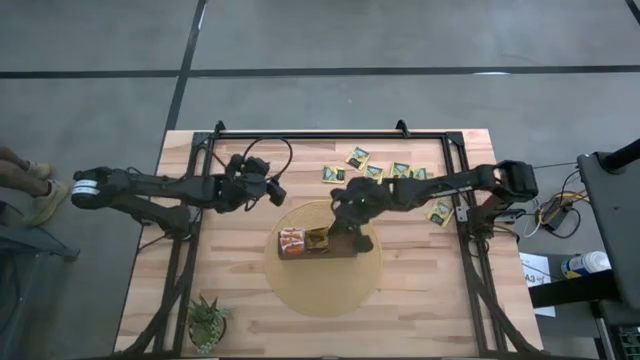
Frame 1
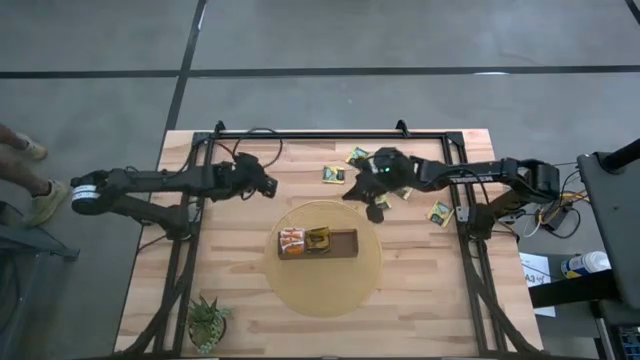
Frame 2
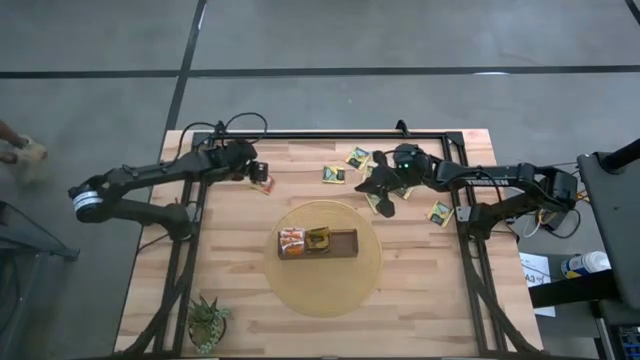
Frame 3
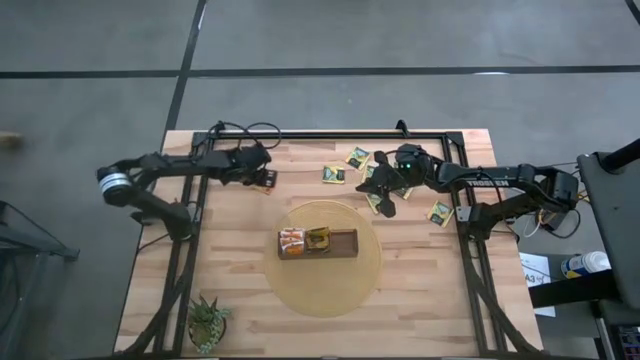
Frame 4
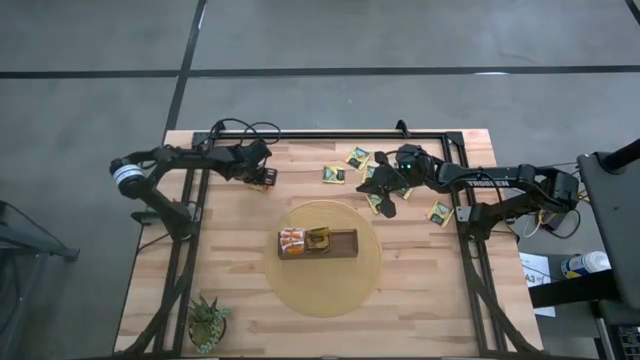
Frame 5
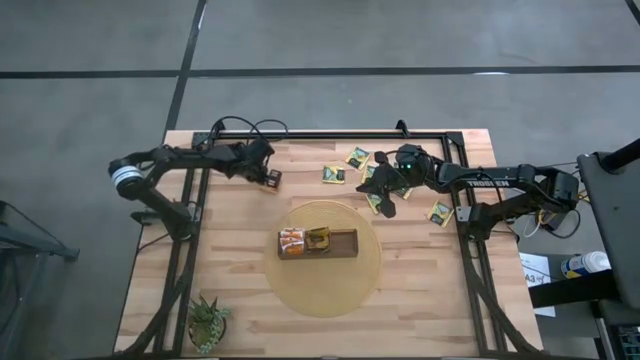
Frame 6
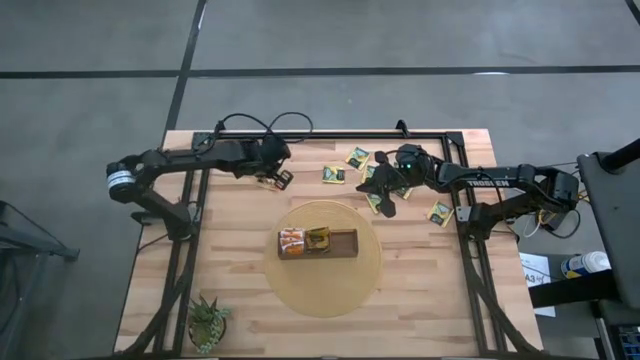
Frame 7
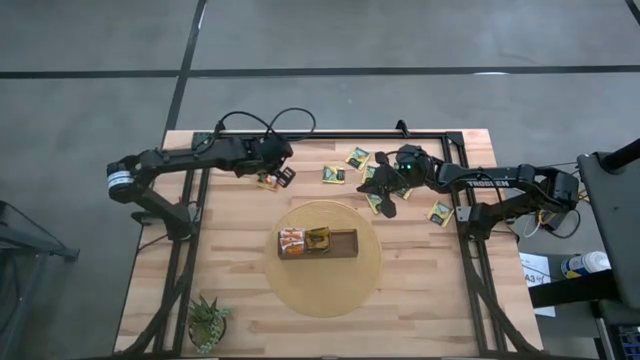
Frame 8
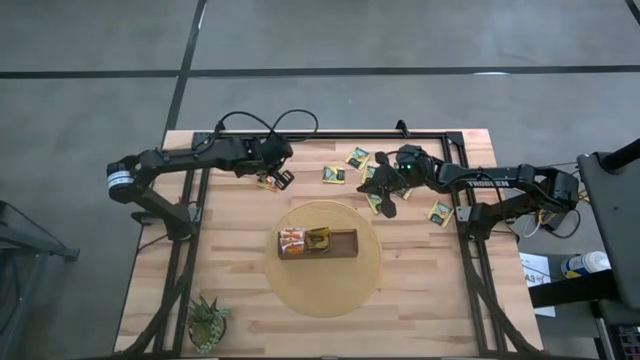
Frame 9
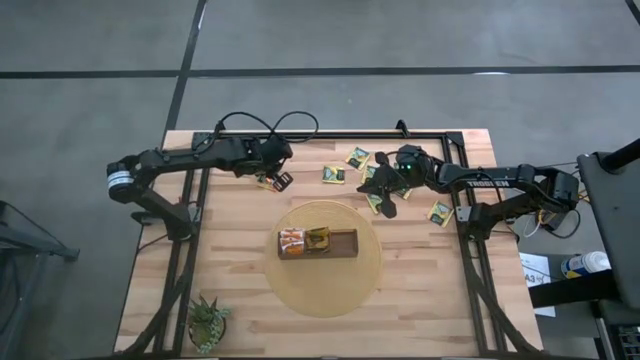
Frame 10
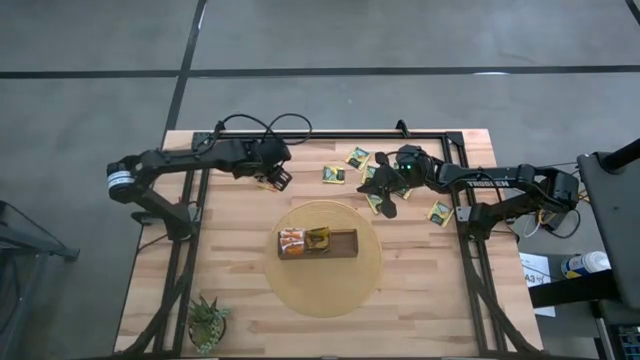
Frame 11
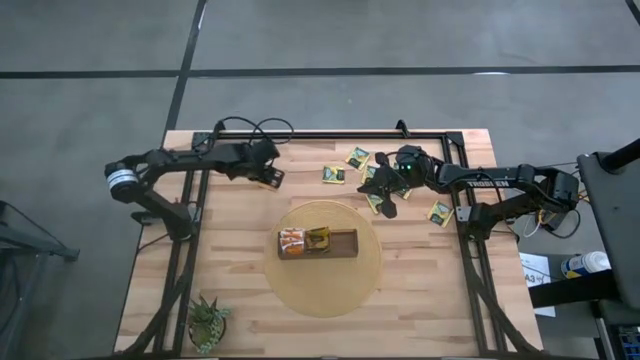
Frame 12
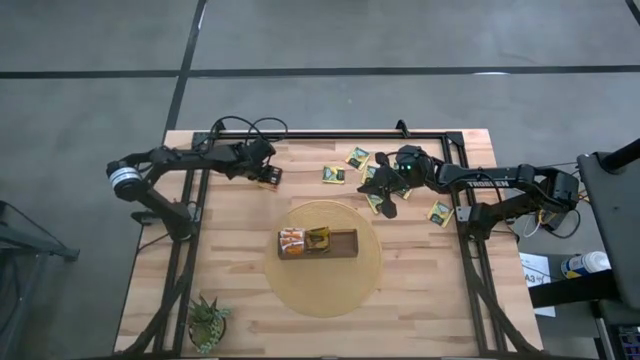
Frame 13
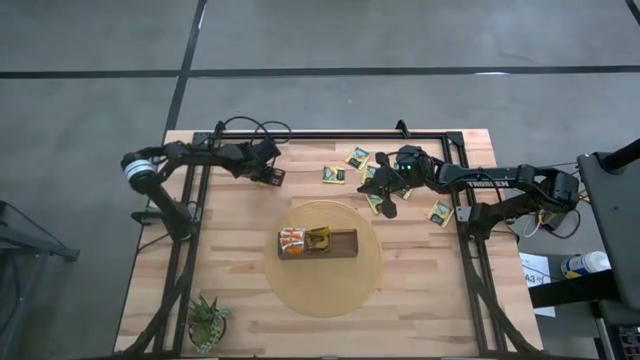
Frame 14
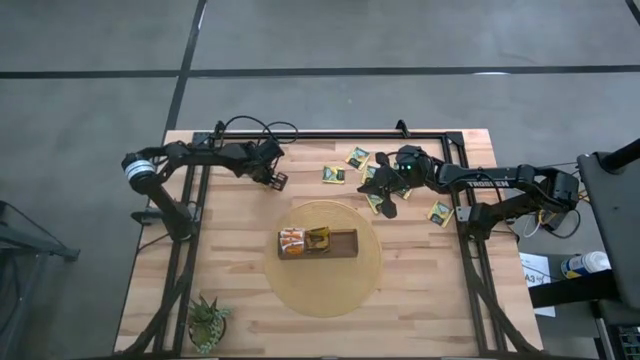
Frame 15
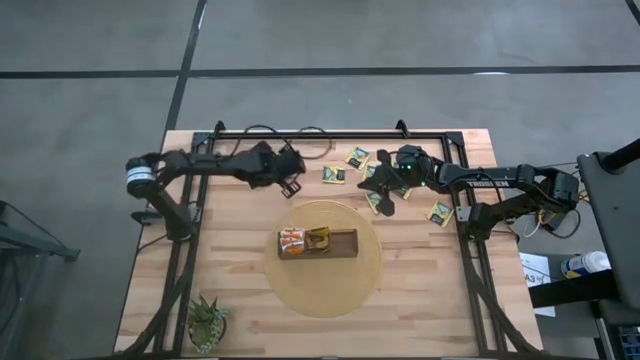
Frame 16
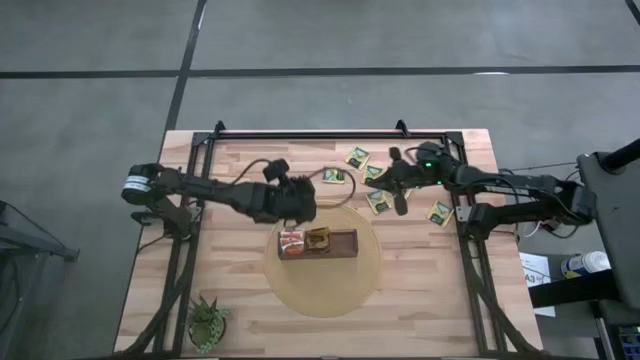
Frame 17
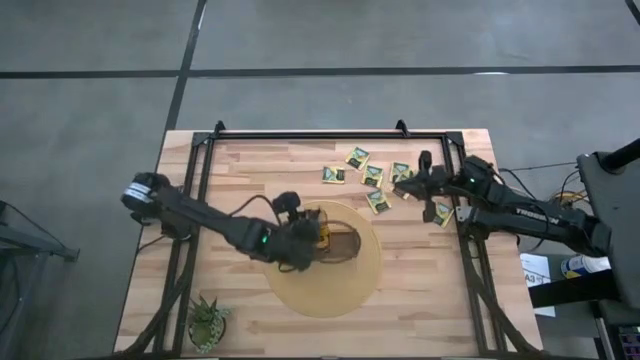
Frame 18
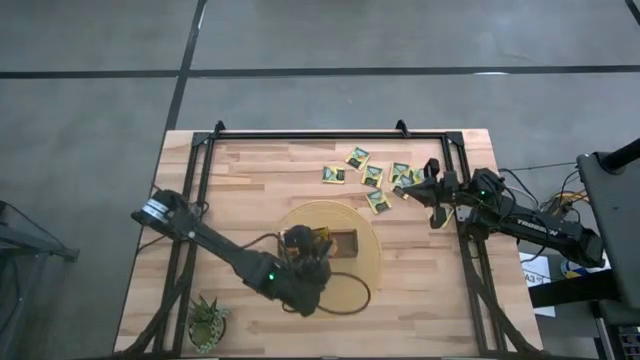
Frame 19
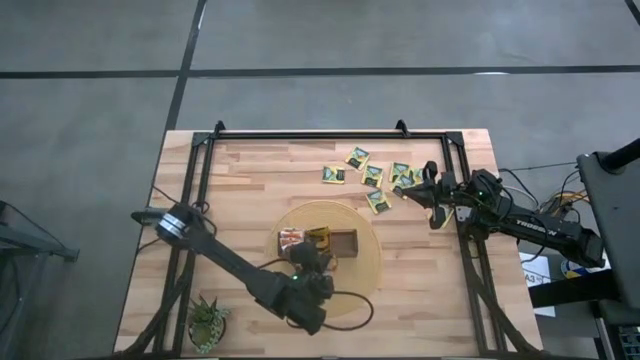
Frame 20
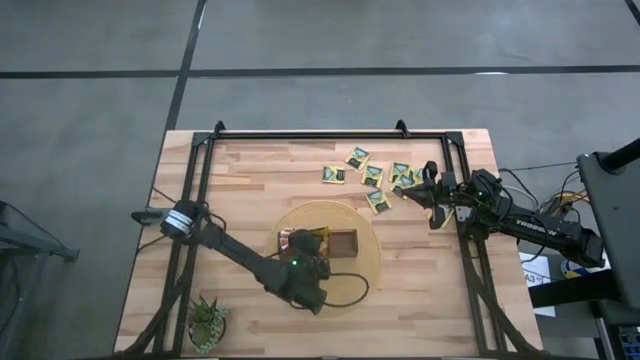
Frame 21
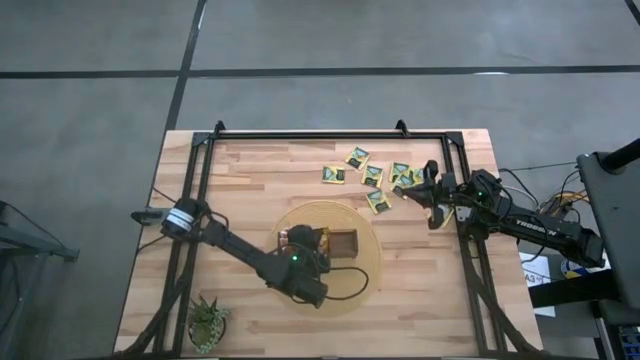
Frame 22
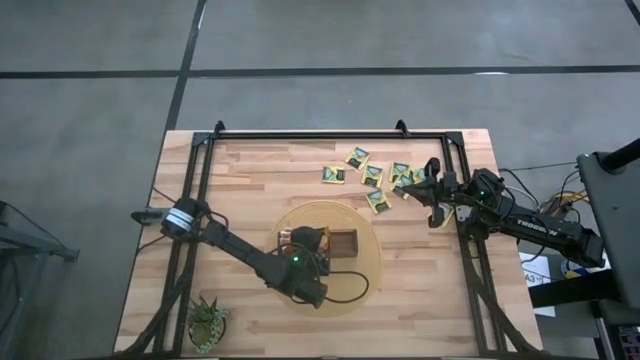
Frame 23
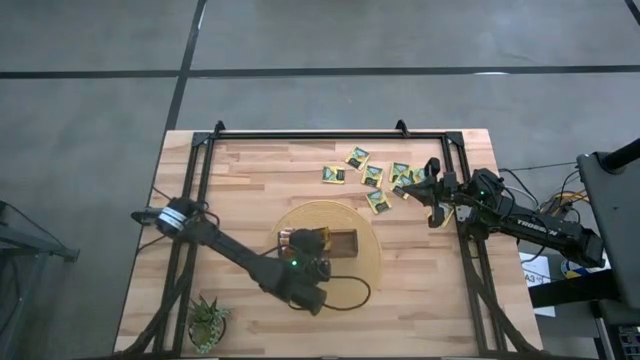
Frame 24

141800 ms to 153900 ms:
Task: Pick & Place Tea
Put the orange tea bag into the middle section of the wooden organizer

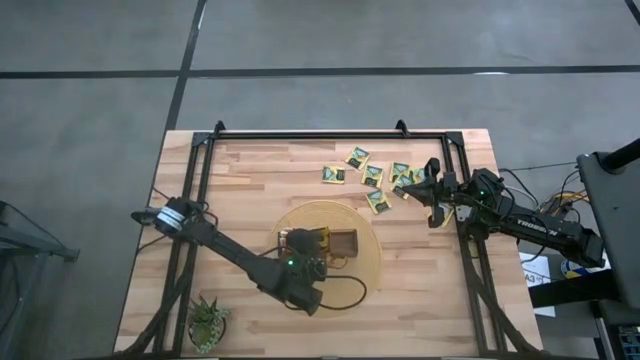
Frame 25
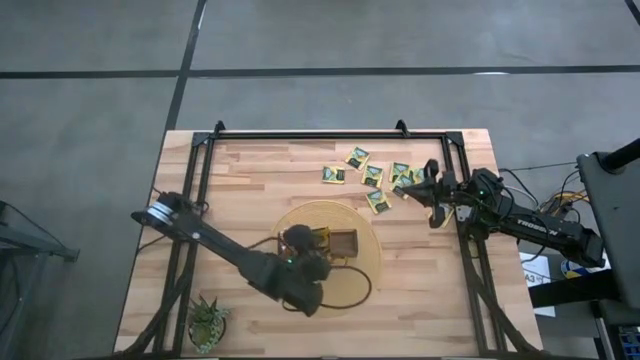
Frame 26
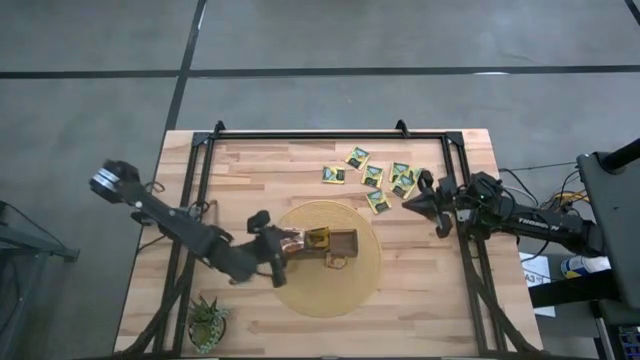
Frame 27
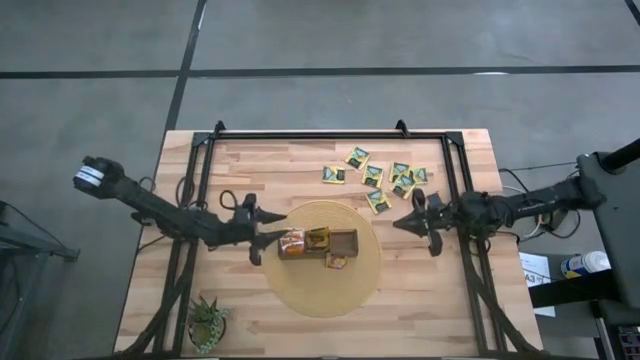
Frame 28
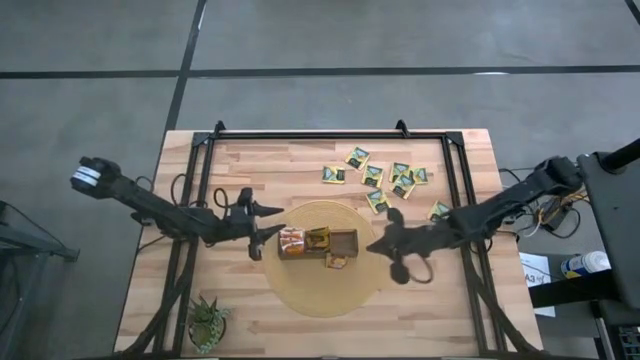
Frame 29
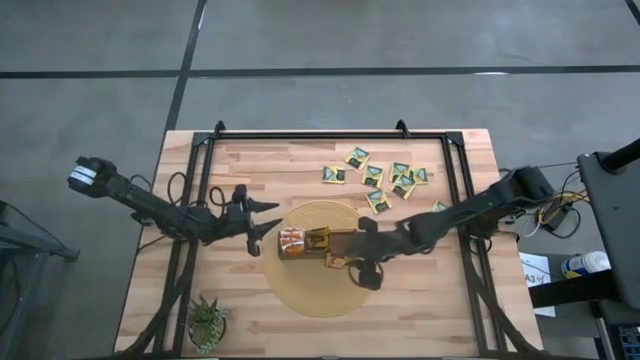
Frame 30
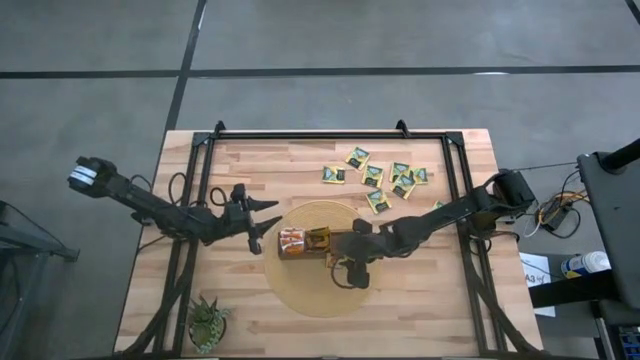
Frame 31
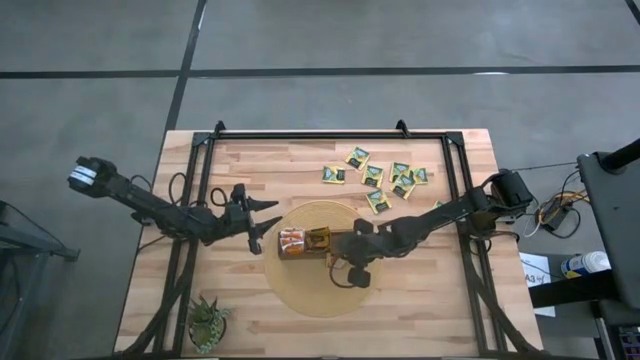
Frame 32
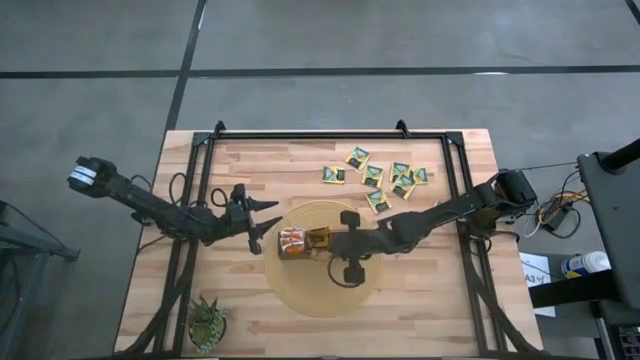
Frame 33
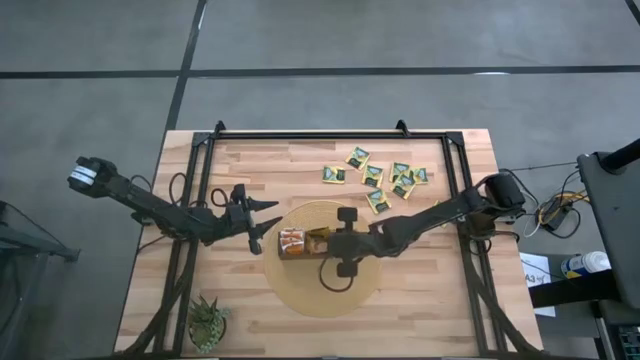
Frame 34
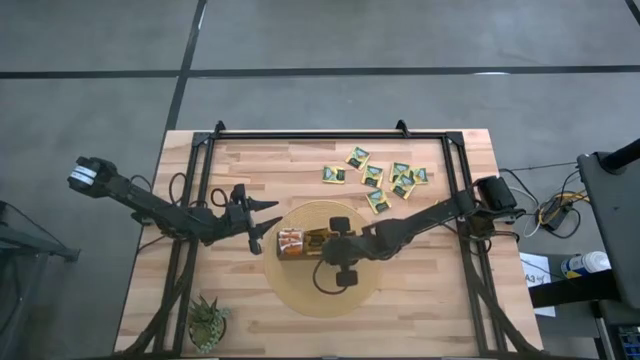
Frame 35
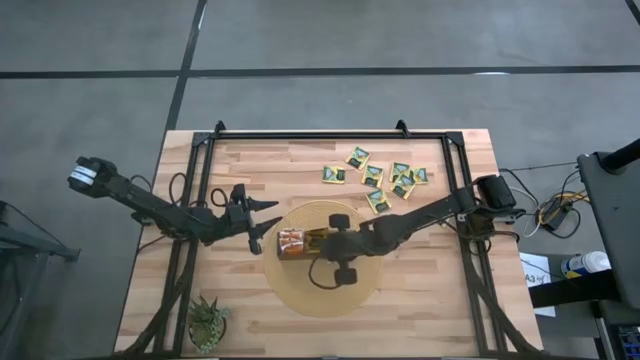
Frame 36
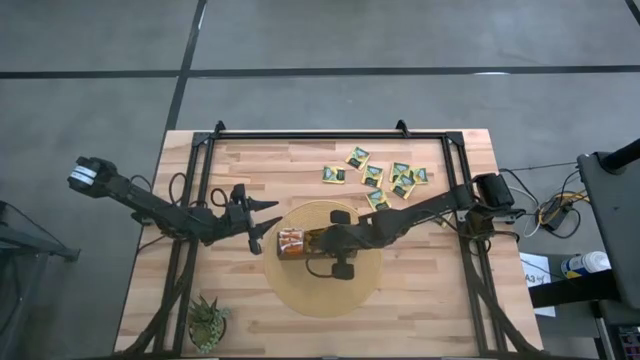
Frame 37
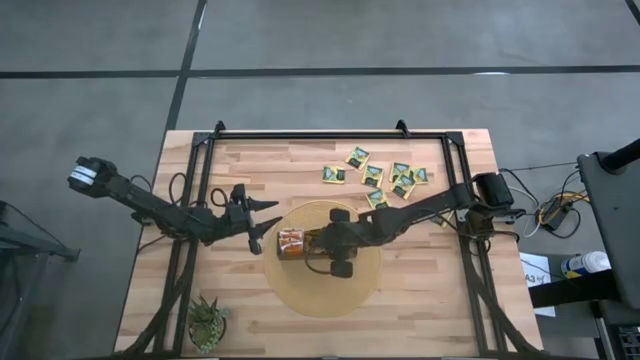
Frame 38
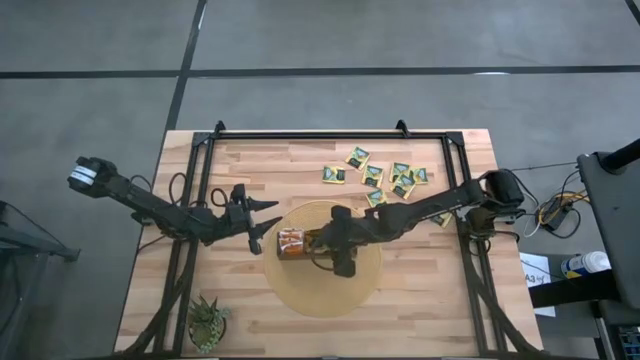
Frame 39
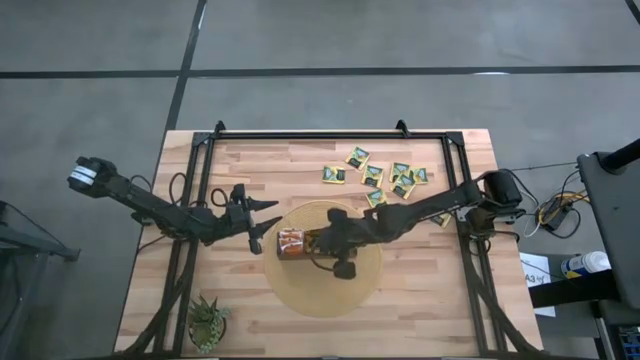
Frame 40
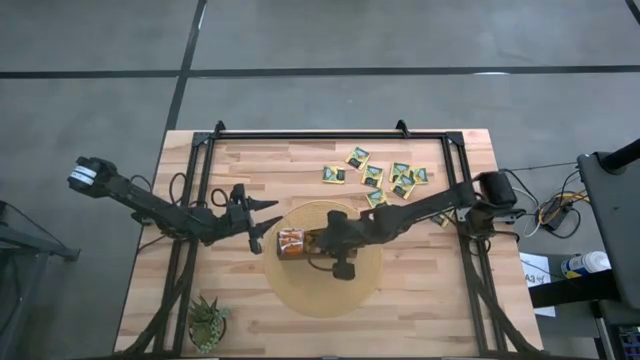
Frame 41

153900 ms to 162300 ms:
Put the orange tea bag into the middle section of the wooden organizer

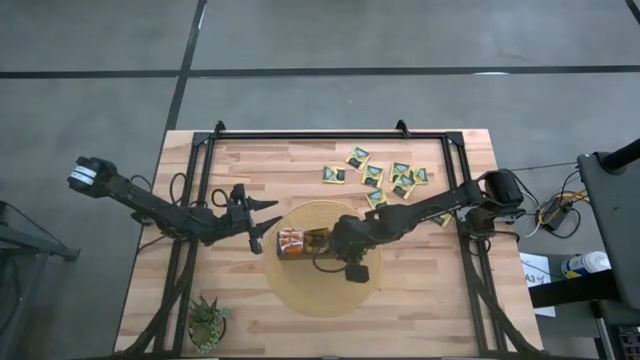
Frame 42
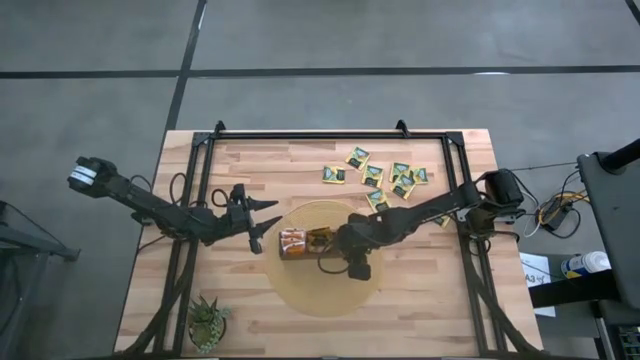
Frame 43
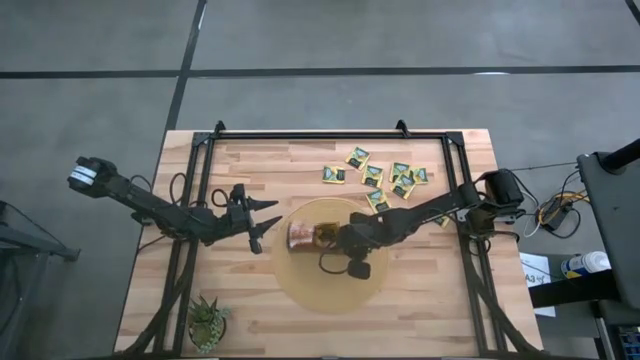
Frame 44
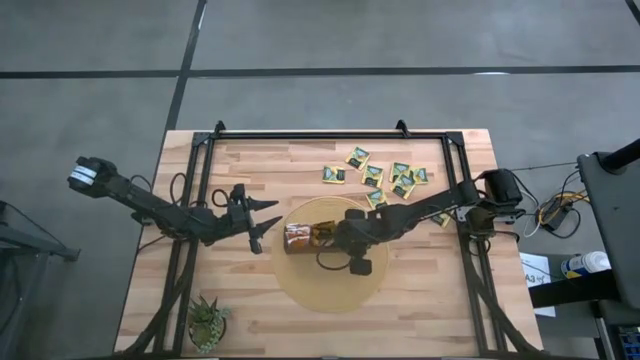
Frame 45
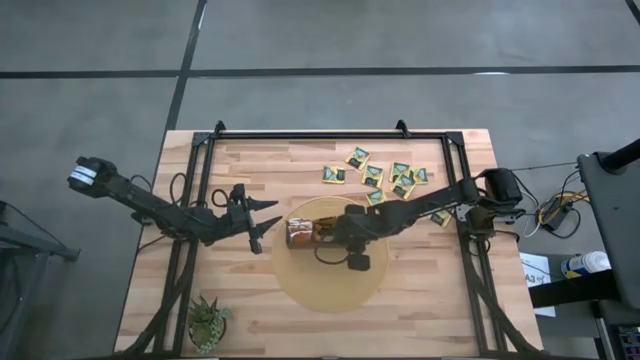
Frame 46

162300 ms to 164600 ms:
Adjust the wooden organizer
